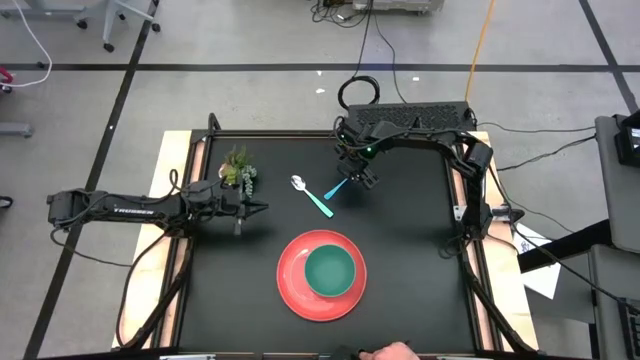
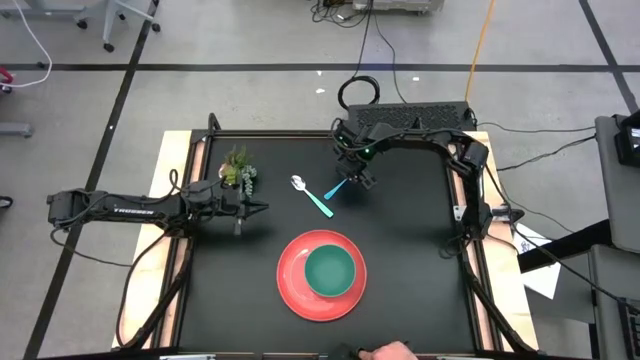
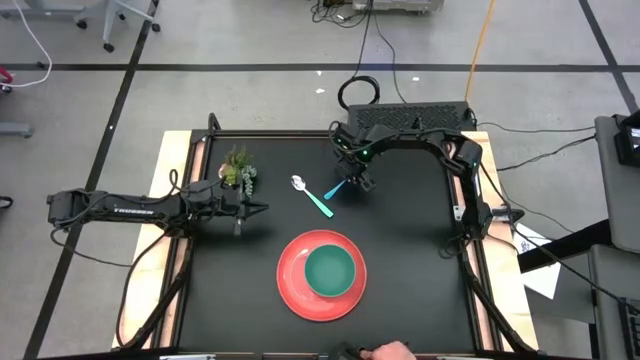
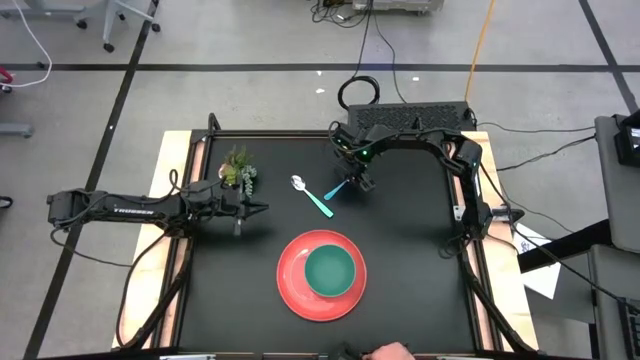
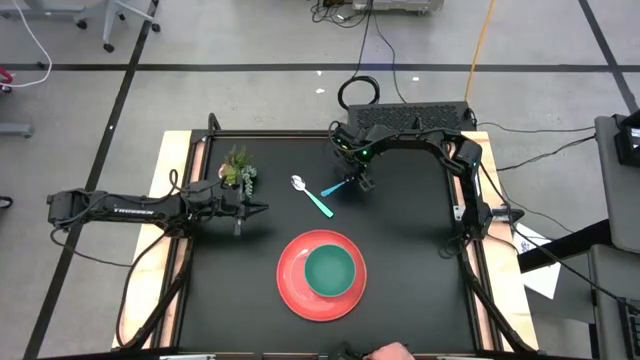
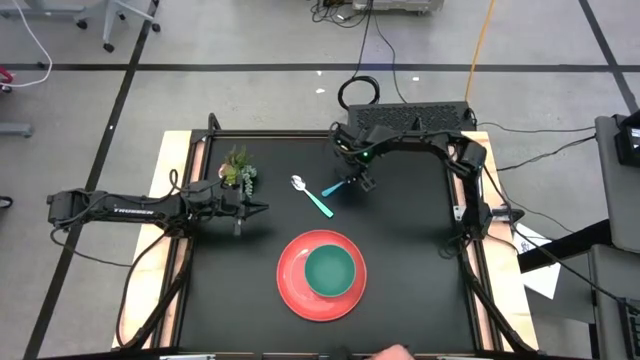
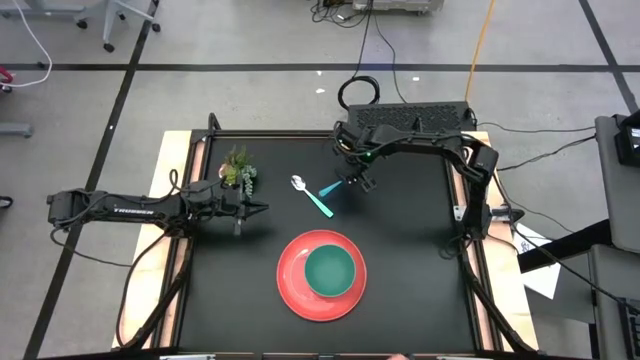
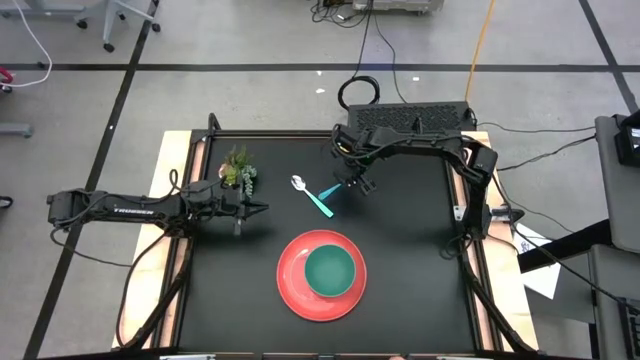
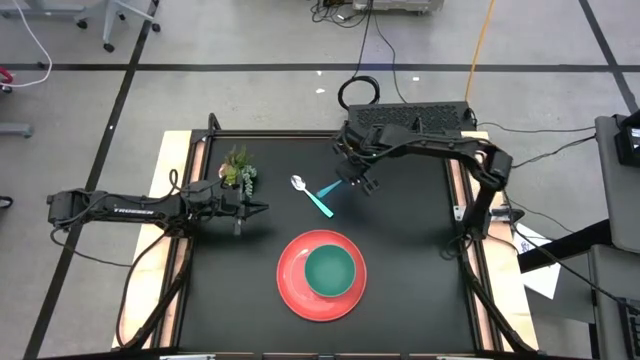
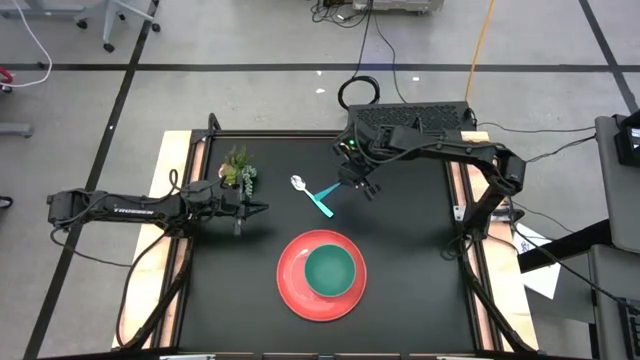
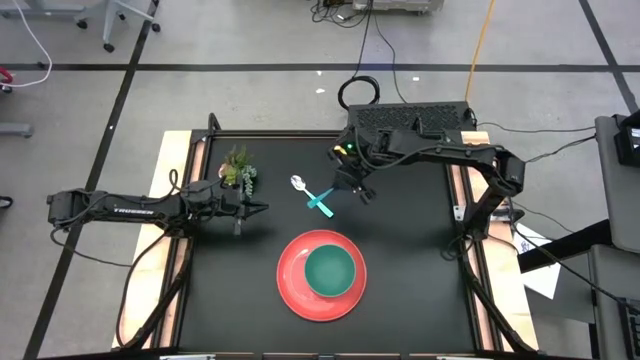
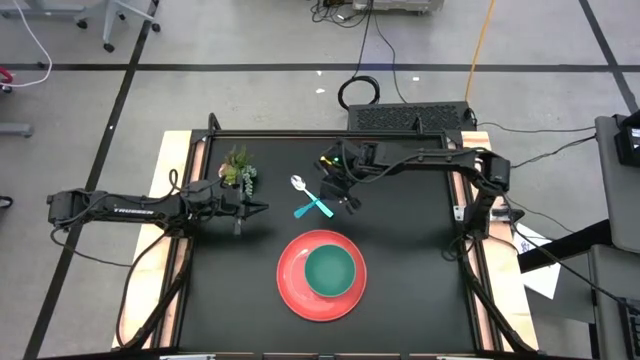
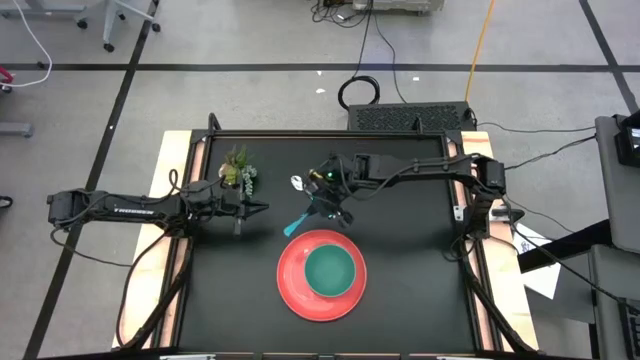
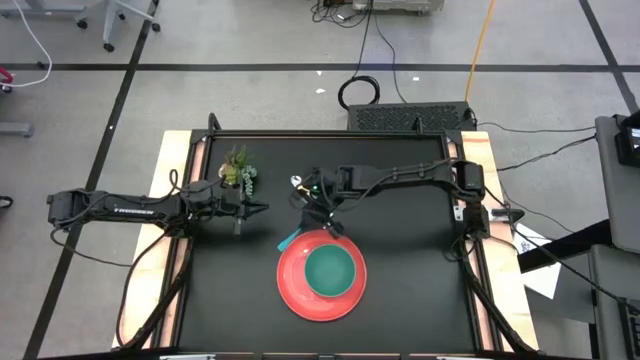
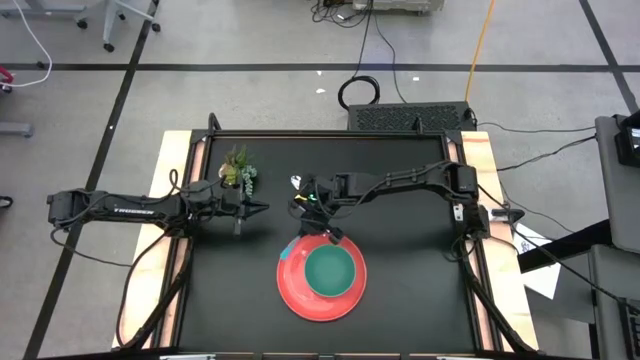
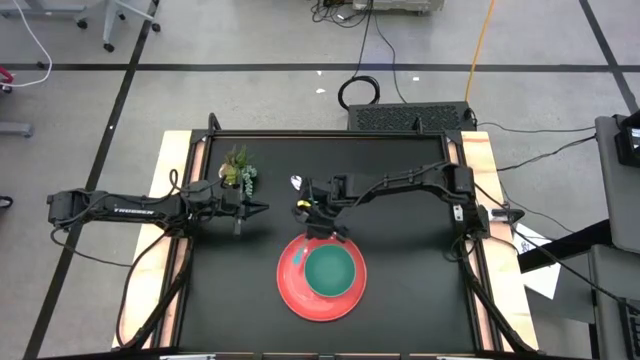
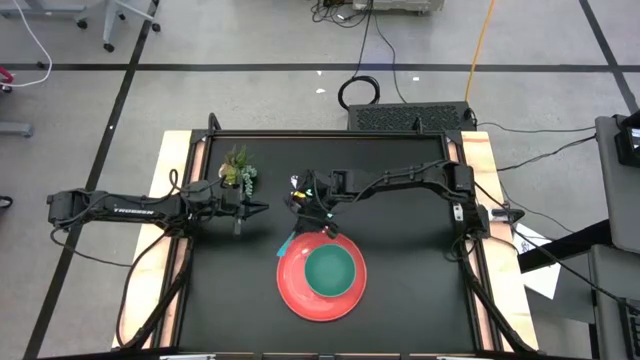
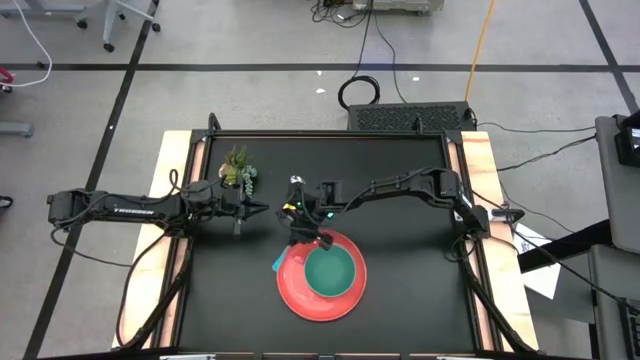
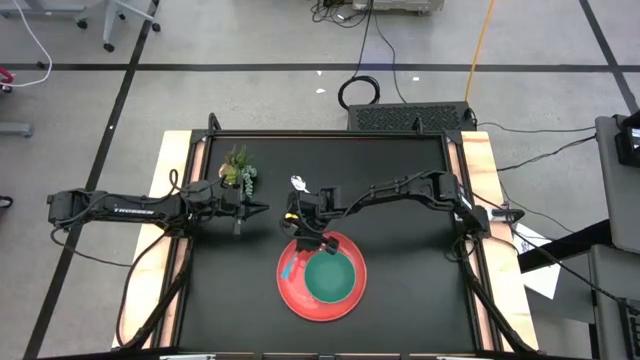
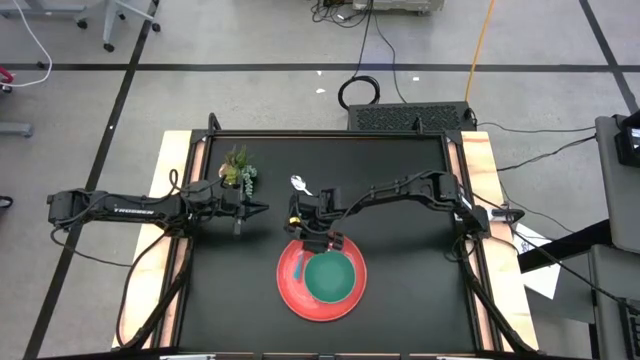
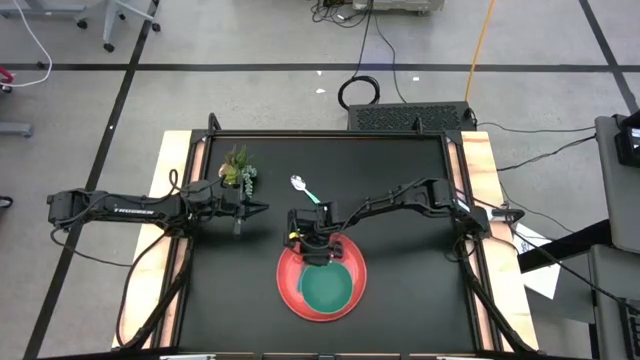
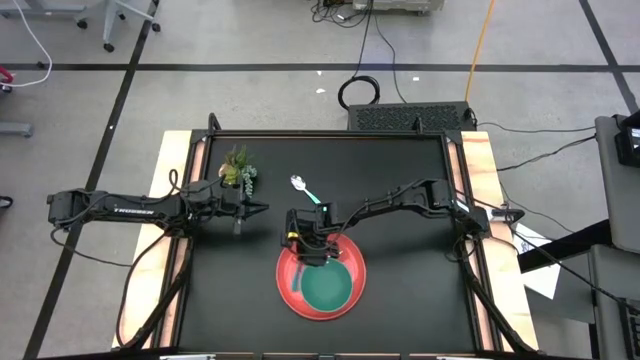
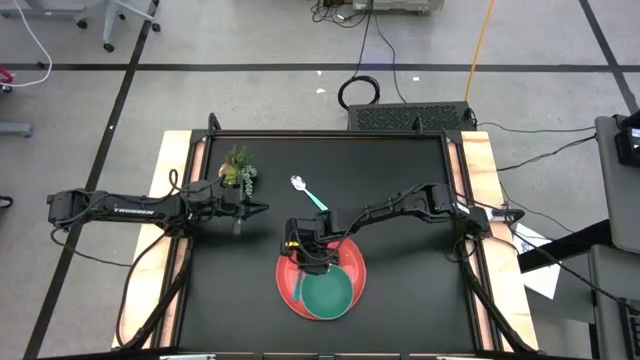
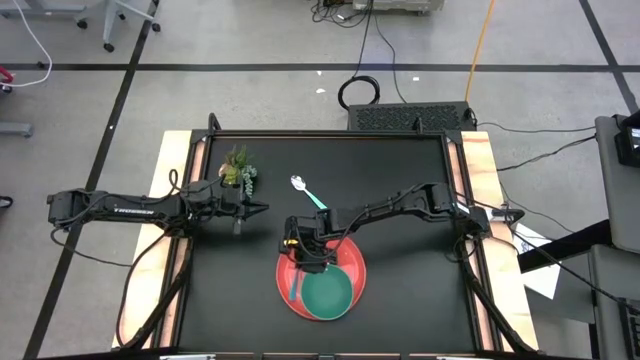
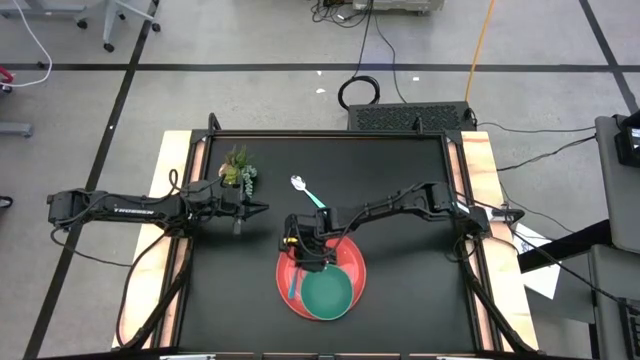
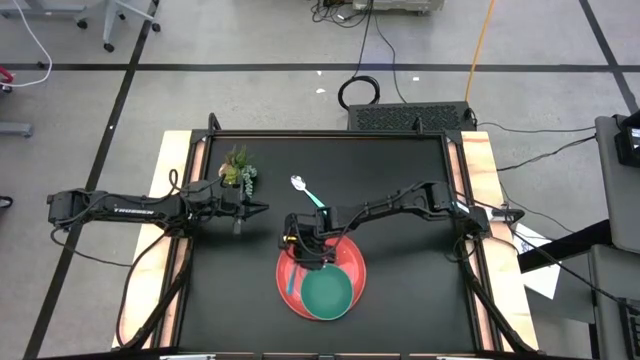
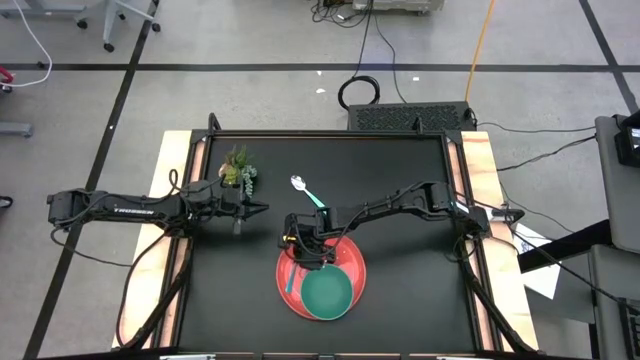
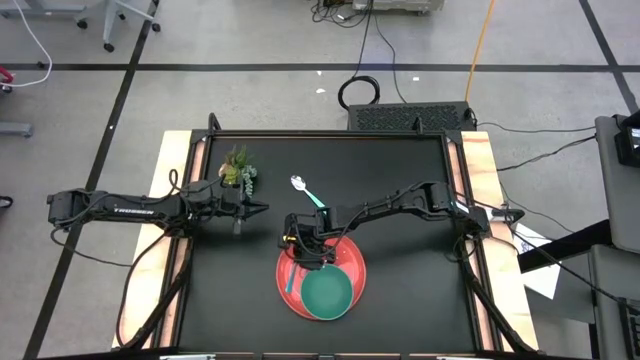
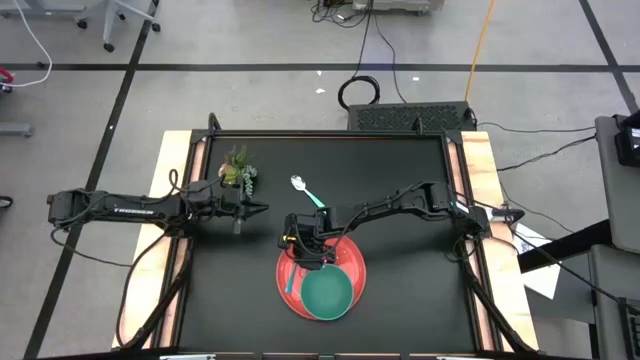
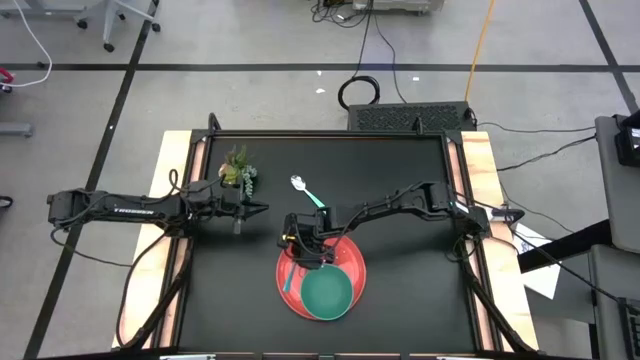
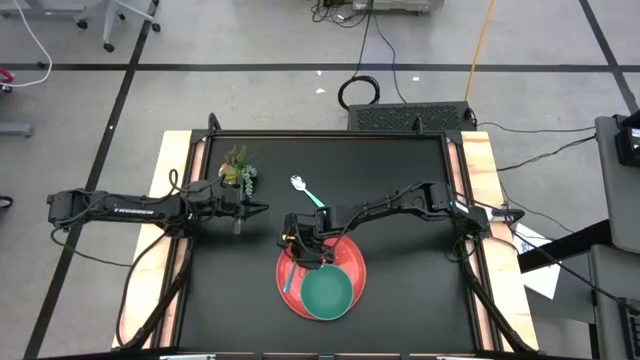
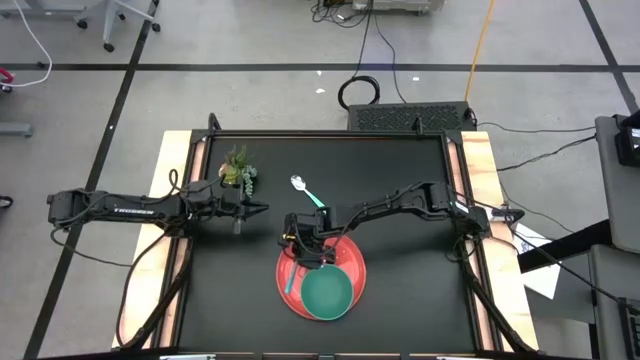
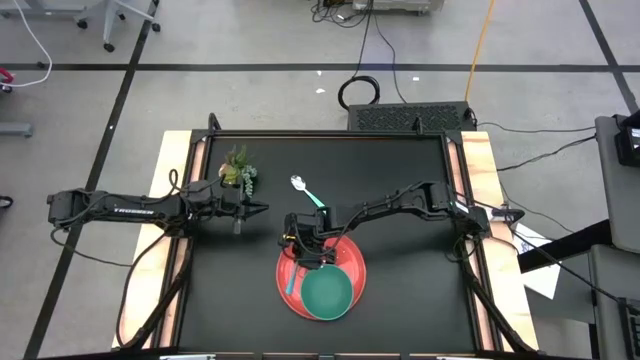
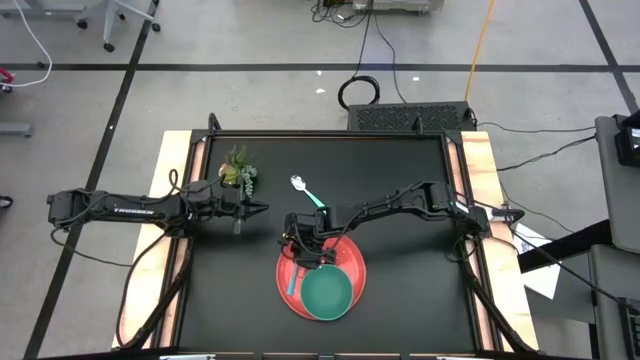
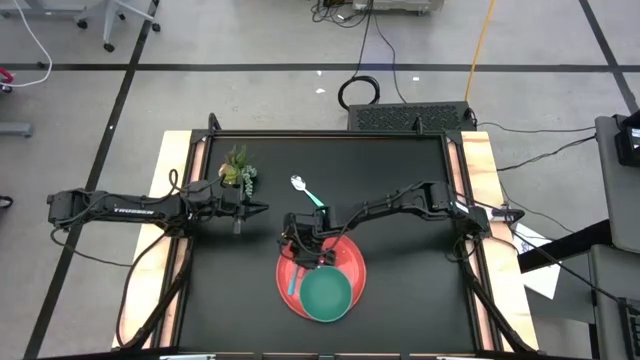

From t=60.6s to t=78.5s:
Task: Set table place
Put the blue fork on the orange plate to the left of the green bowl

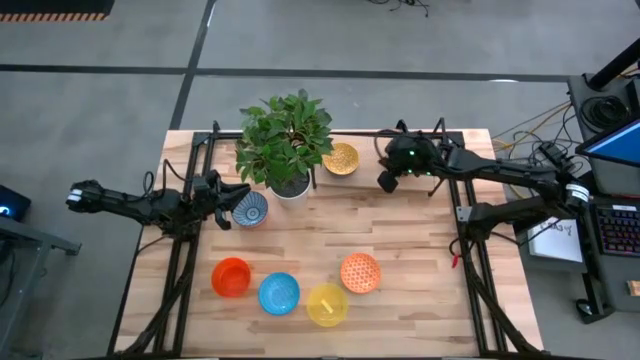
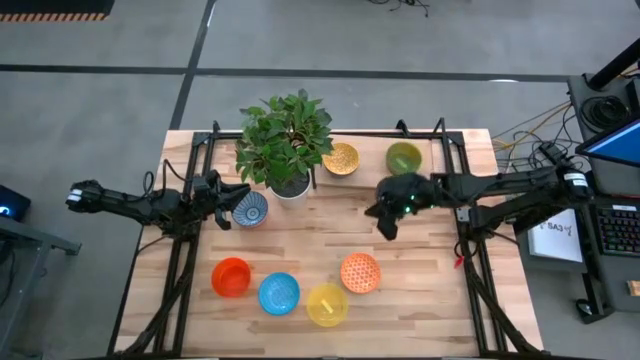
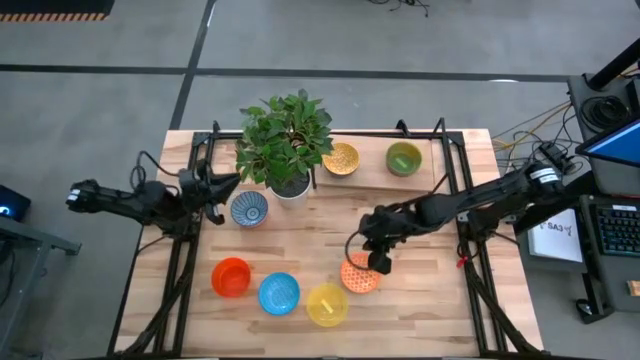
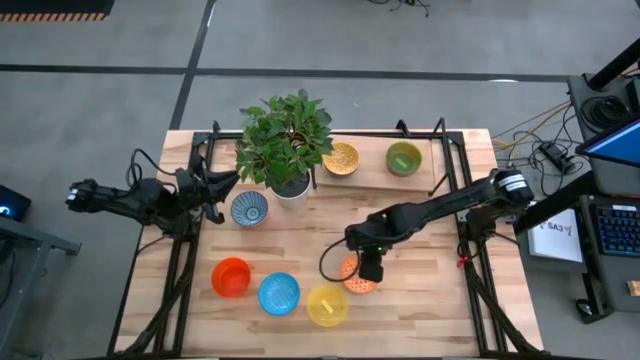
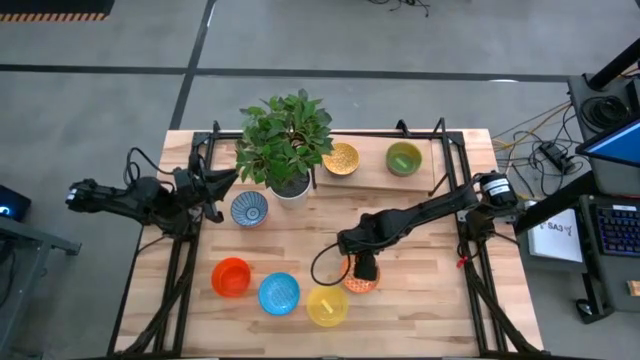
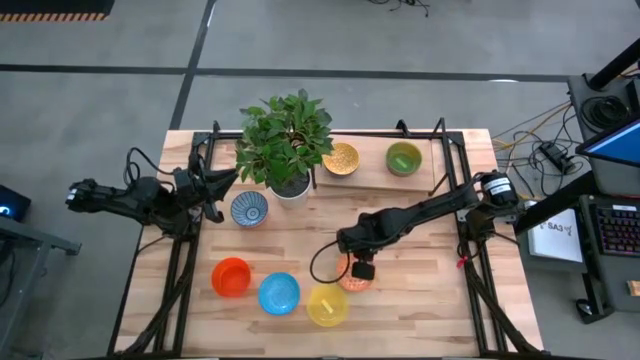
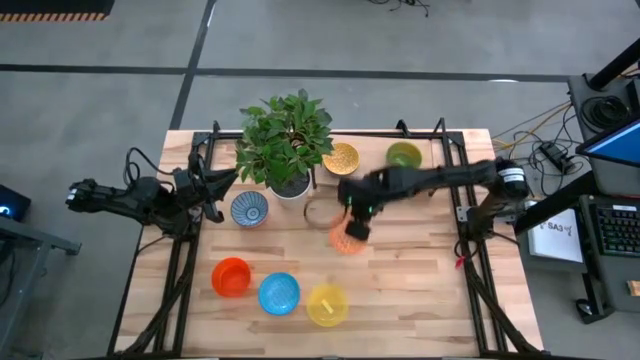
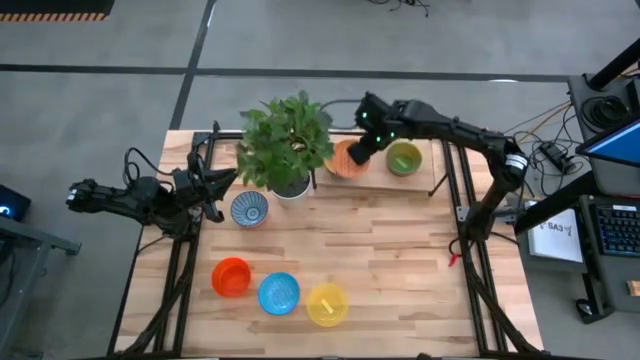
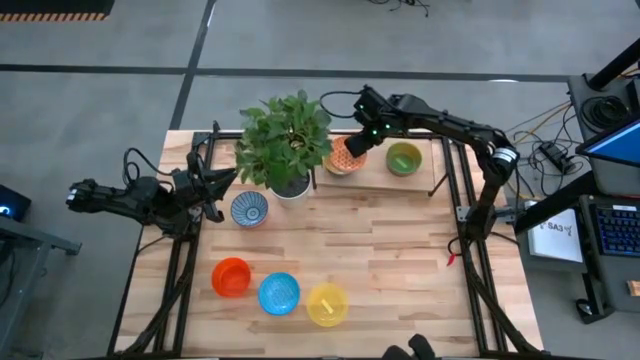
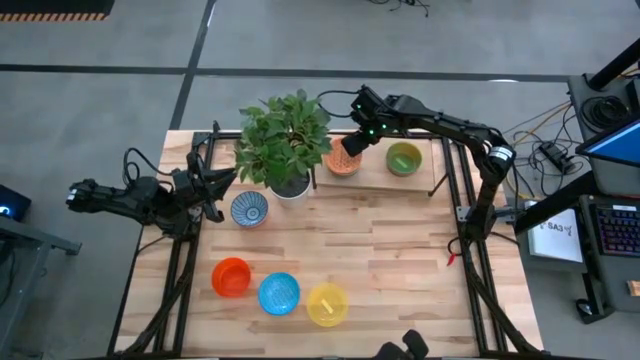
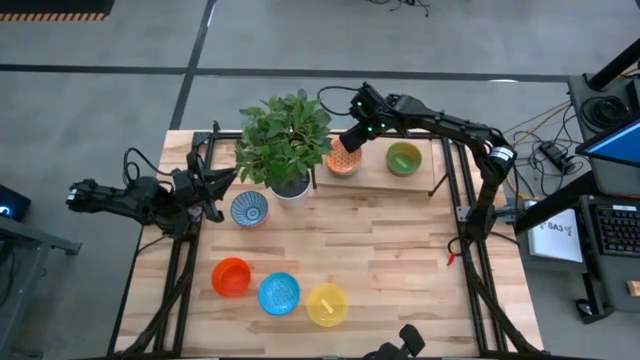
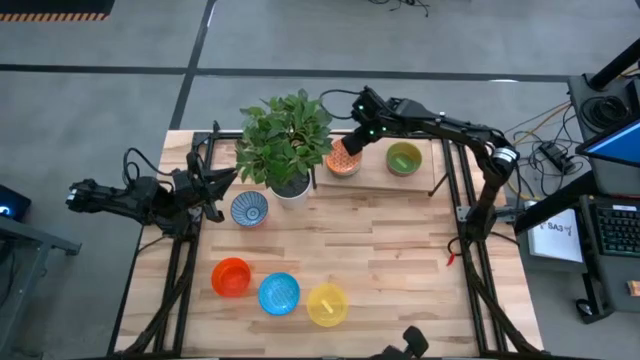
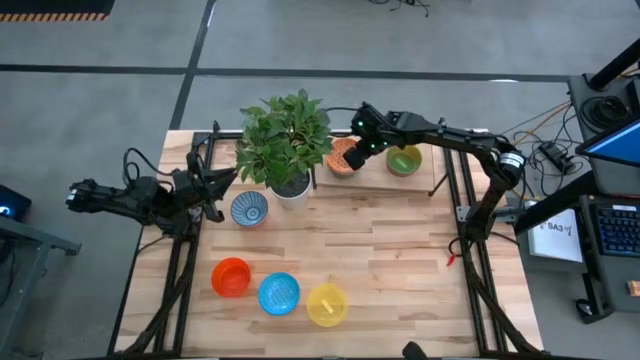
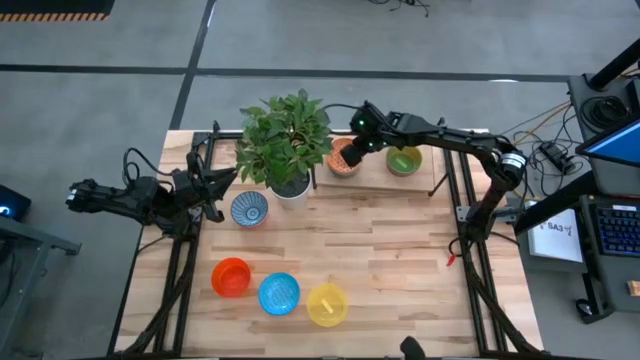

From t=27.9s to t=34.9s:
Task: Place and stack bowls onto a shelf
Stack the orange patterned bowl on the yellow patterned bowl on the shelf
